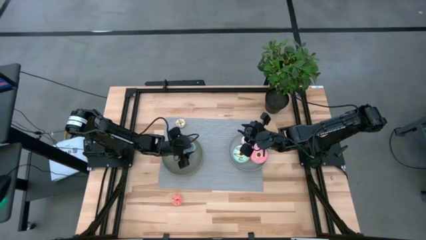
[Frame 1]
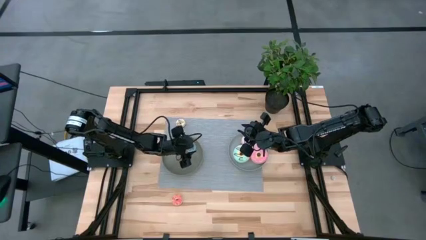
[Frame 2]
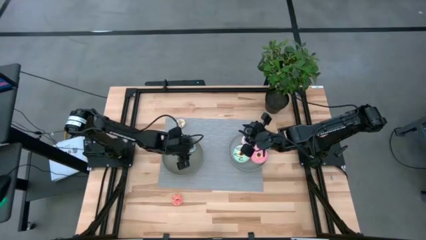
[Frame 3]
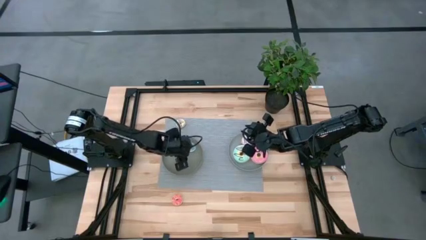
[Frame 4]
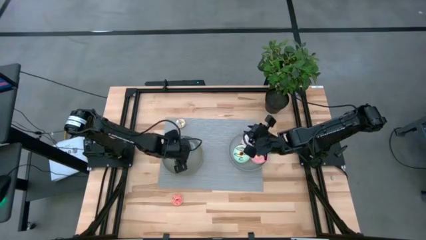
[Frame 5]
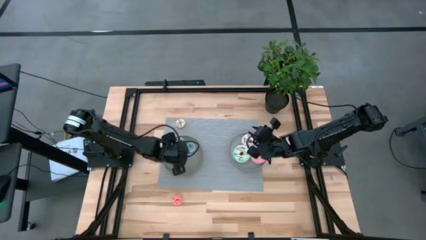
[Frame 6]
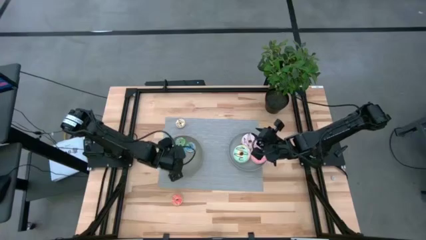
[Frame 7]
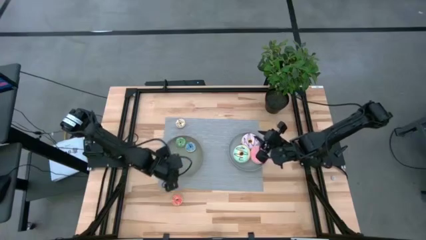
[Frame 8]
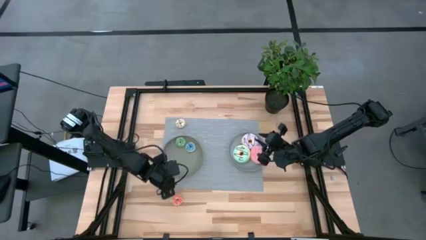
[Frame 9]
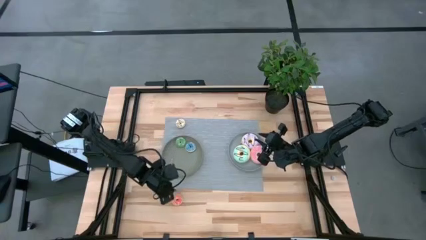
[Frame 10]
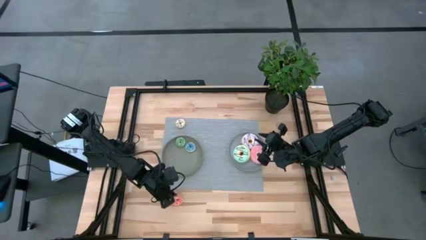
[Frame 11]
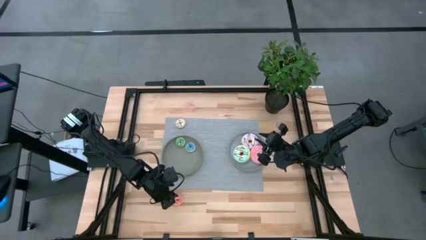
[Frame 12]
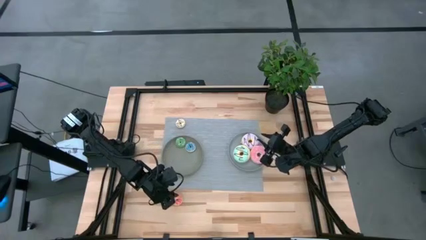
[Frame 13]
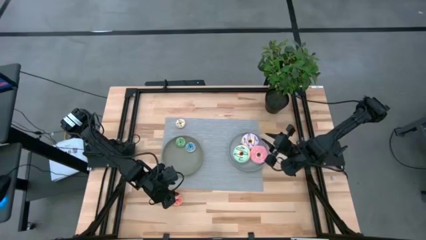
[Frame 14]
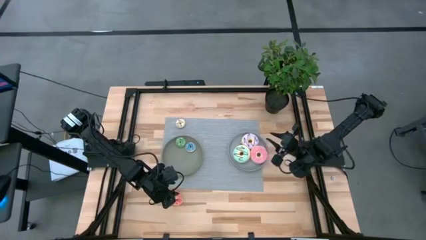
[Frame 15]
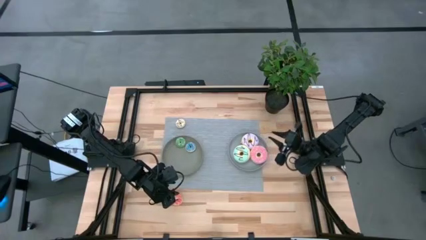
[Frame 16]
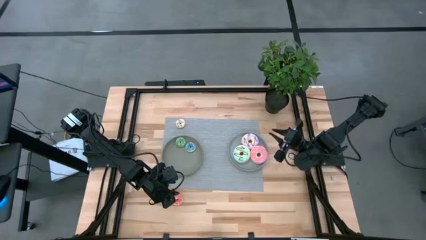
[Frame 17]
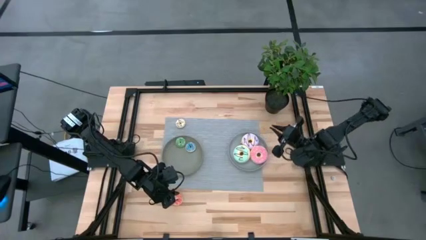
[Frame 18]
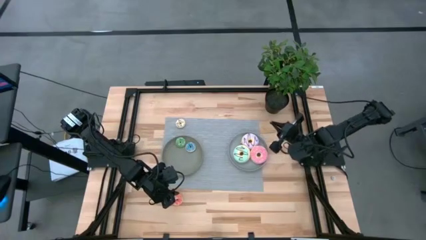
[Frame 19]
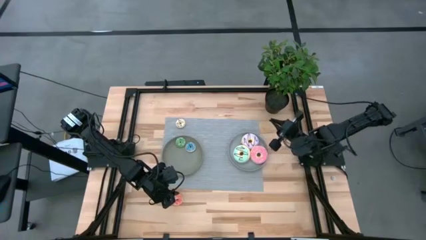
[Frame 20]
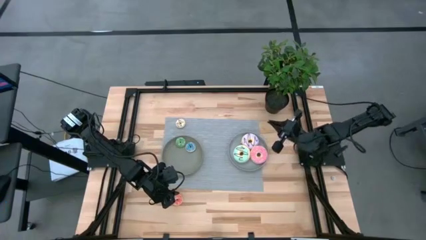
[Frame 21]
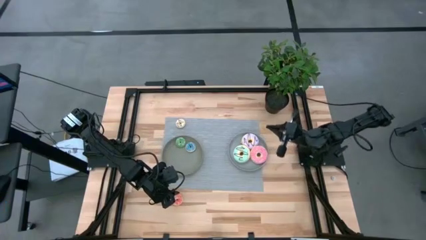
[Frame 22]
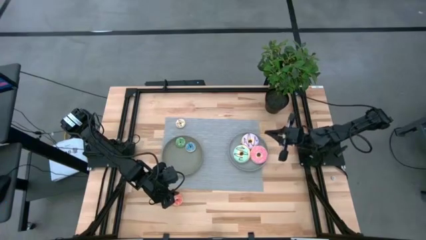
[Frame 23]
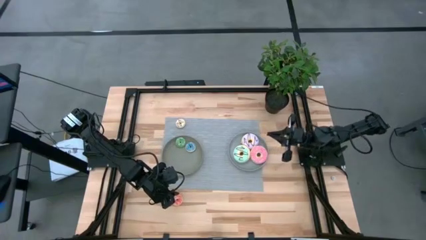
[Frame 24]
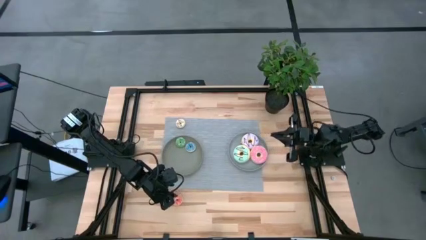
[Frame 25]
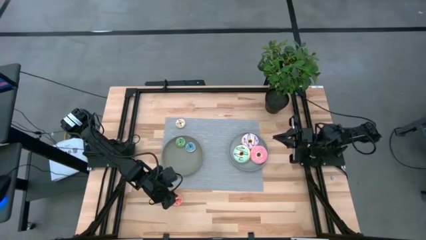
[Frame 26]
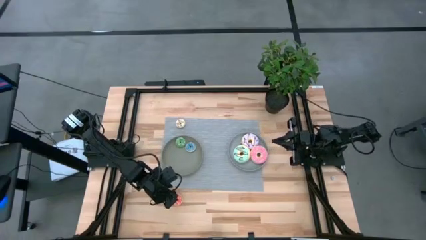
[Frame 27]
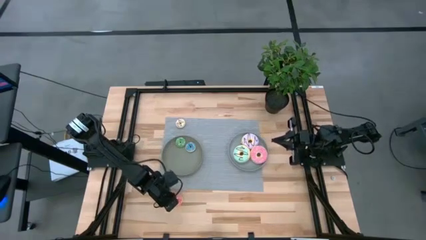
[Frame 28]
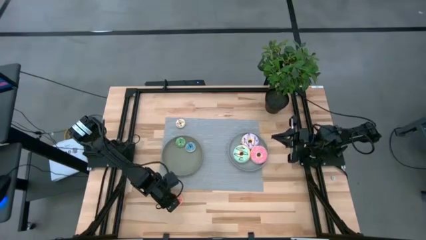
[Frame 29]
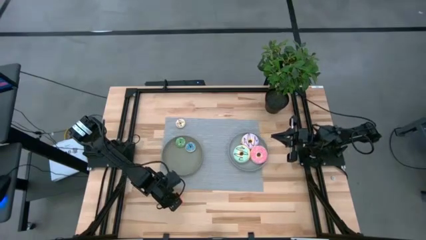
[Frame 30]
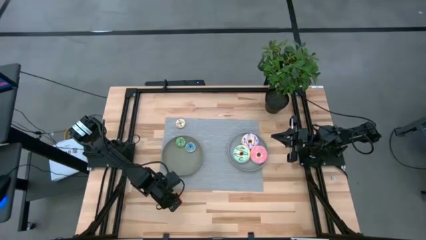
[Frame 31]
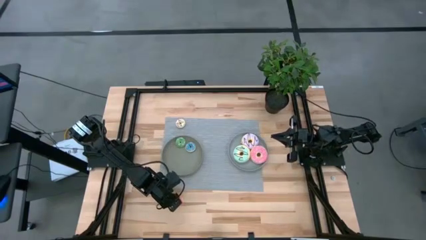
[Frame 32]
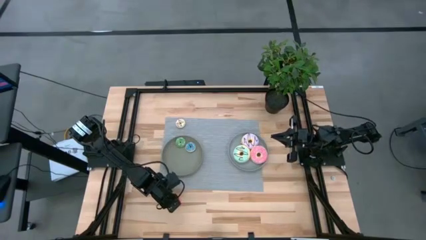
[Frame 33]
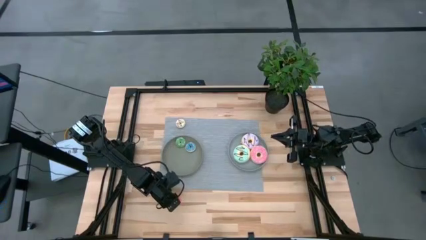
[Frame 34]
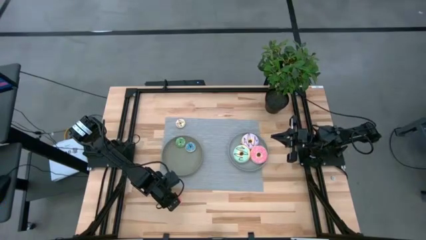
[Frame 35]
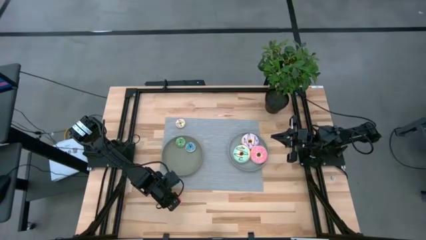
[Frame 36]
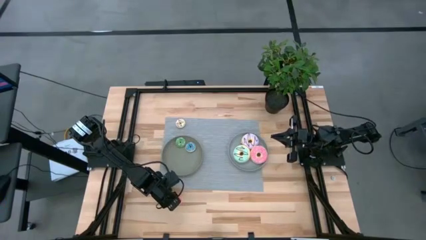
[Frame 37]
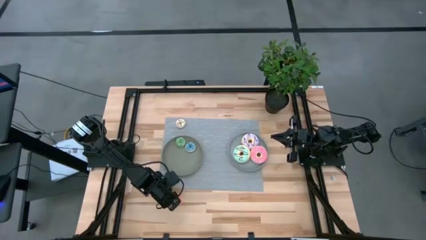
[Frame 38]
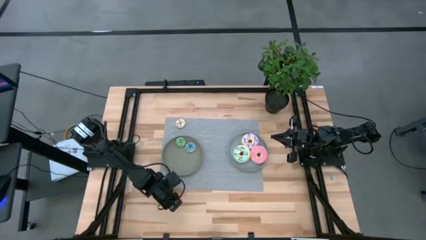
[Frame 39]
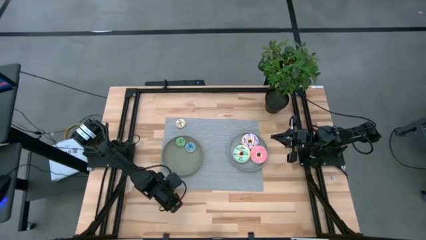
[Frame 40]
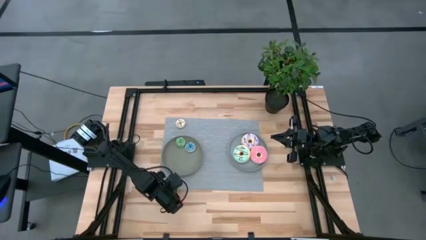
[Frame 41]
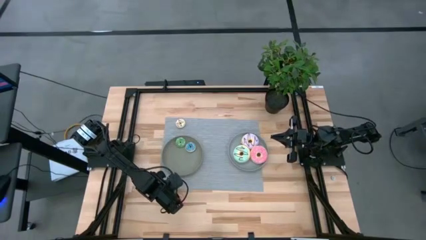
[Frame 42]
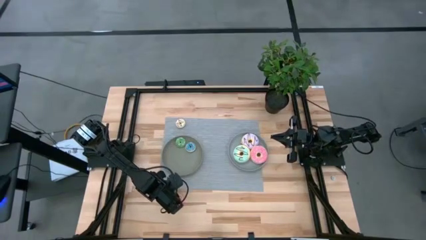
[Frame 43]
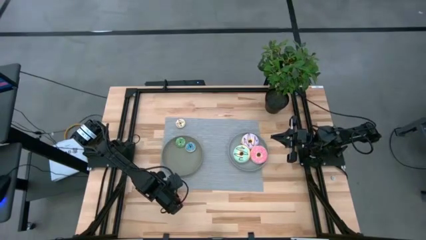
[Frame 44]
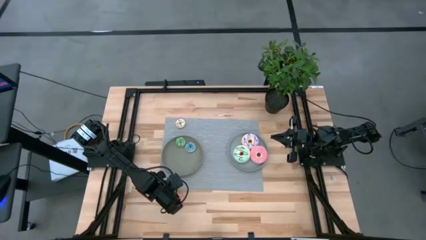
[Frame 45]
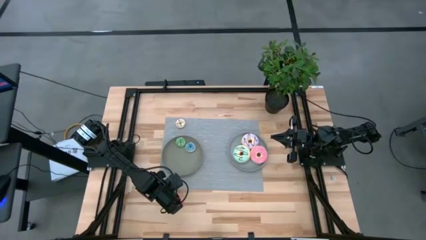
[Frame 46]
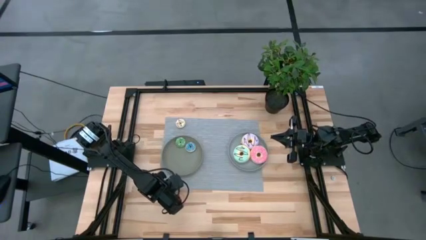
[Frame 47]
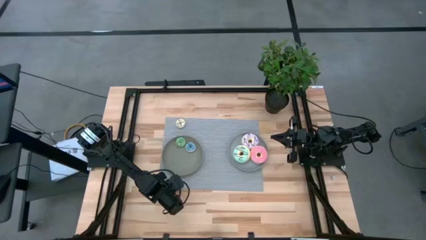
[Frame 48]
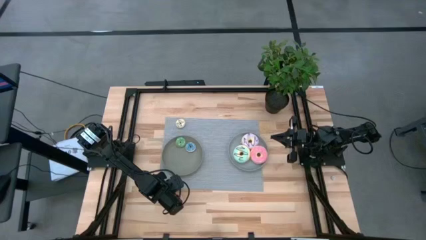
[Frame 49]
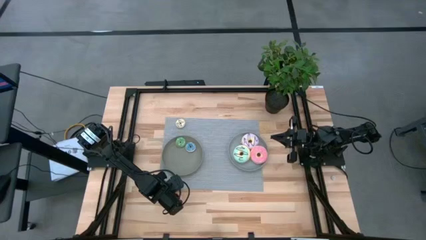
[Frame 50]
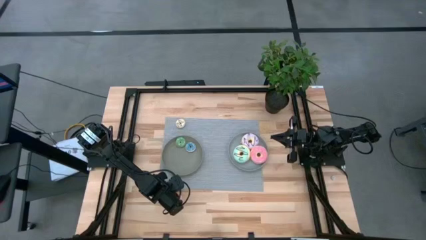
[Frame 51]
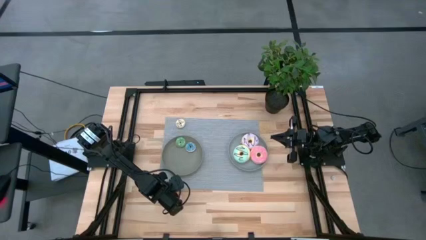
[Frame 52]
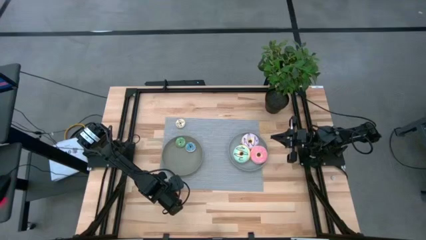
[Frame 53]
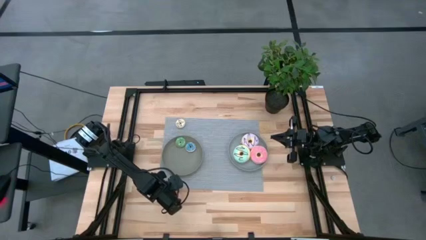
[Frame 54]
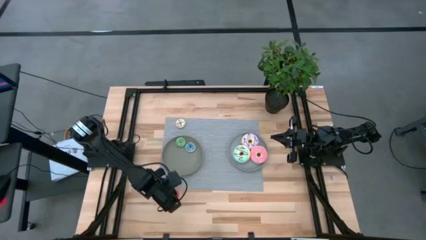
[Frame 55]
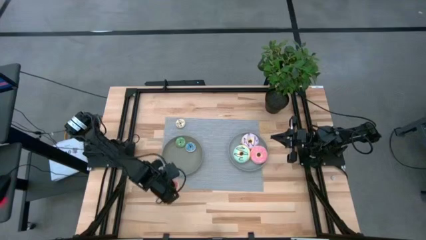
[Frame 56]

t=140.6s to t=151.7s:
Task: Pick & Place donuts
Put the small pink donut into the green plate

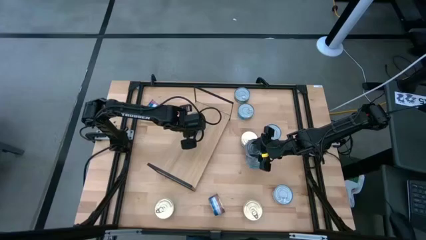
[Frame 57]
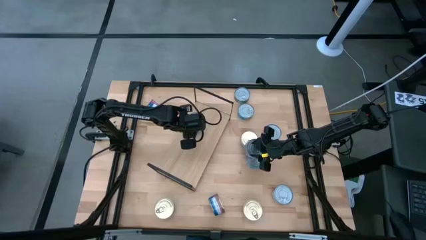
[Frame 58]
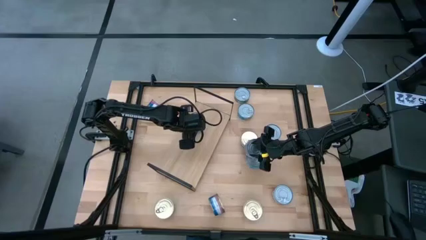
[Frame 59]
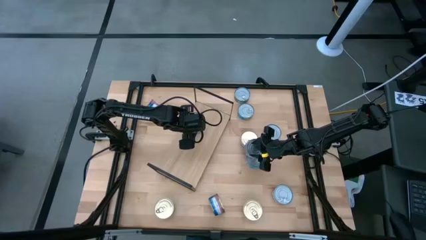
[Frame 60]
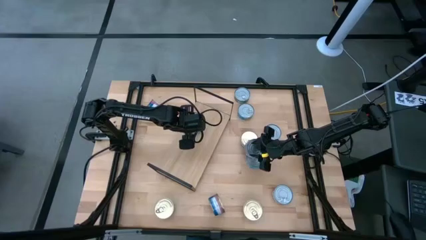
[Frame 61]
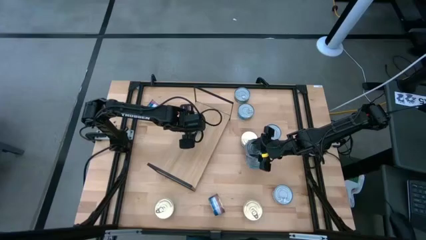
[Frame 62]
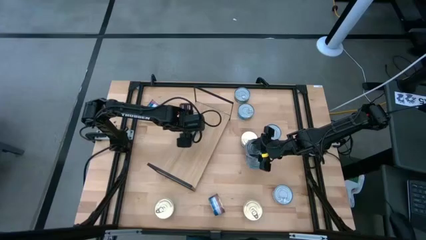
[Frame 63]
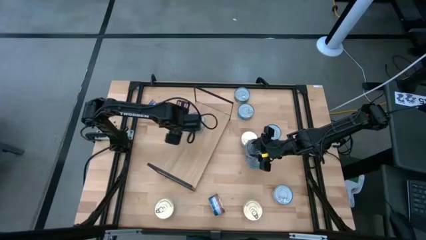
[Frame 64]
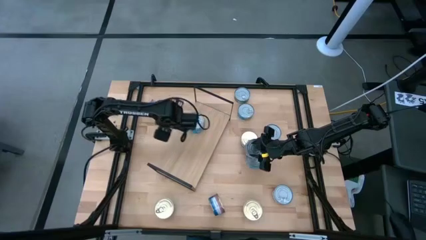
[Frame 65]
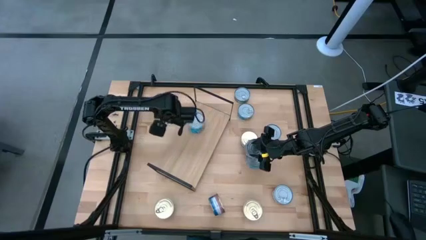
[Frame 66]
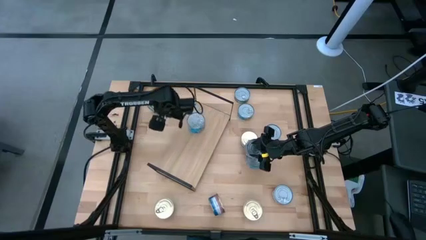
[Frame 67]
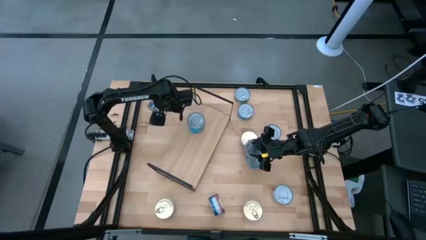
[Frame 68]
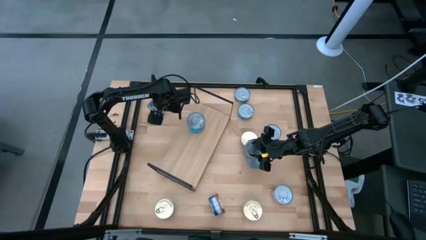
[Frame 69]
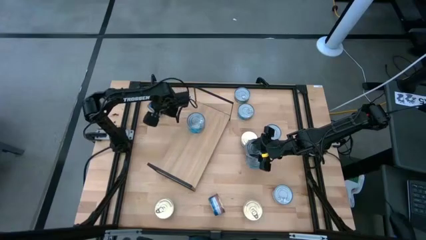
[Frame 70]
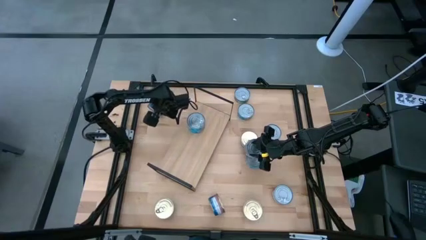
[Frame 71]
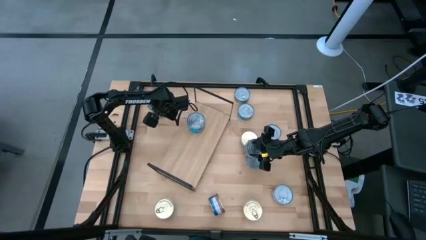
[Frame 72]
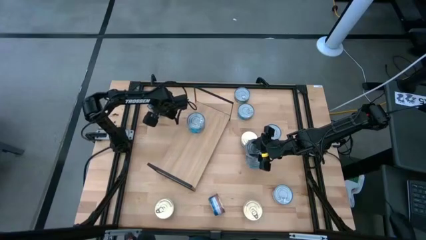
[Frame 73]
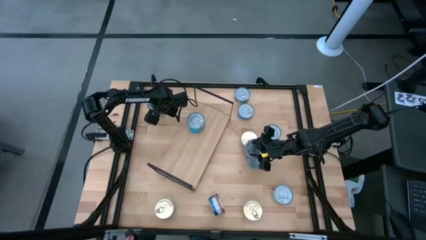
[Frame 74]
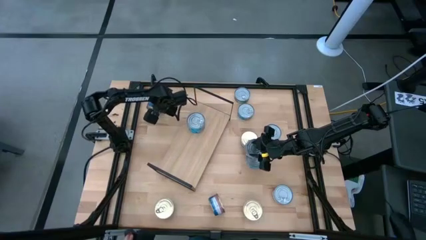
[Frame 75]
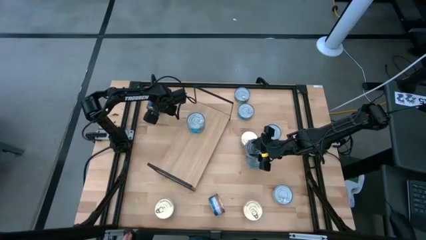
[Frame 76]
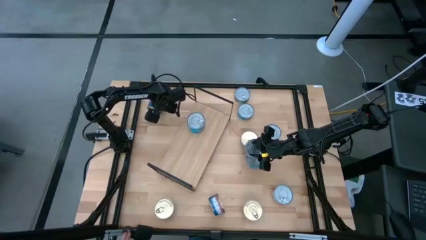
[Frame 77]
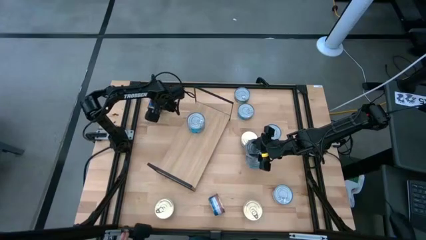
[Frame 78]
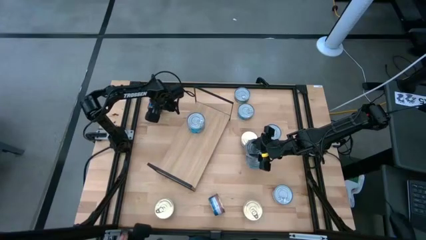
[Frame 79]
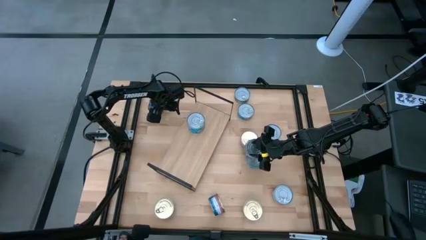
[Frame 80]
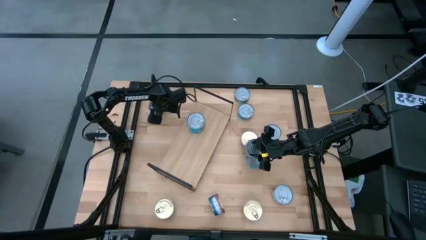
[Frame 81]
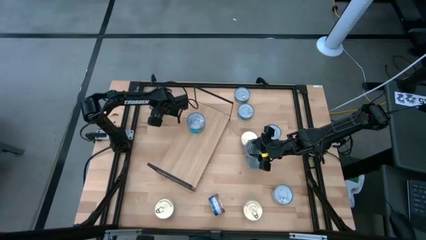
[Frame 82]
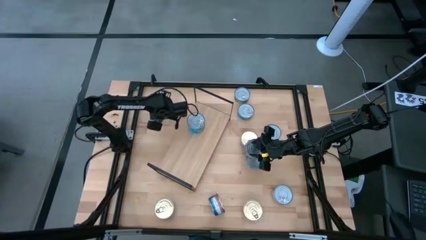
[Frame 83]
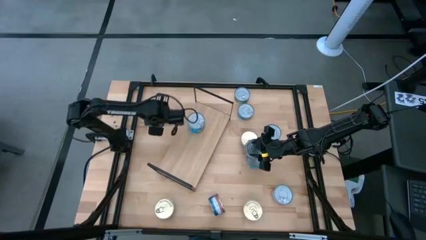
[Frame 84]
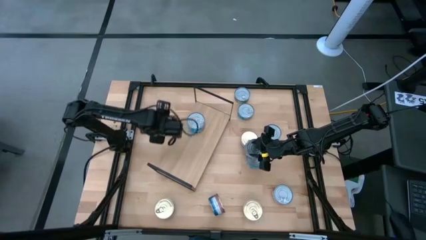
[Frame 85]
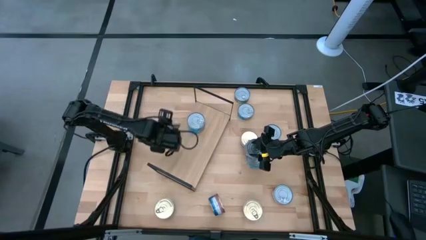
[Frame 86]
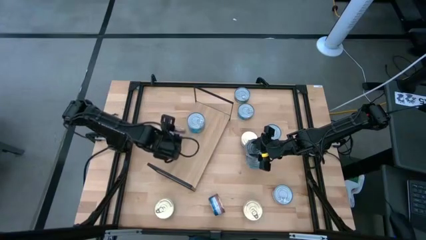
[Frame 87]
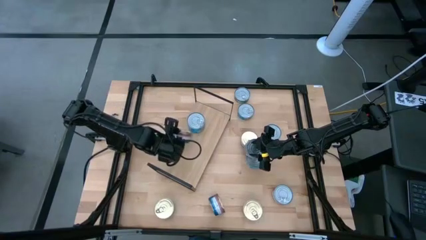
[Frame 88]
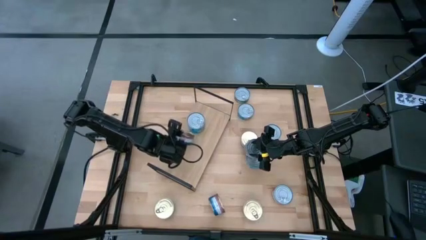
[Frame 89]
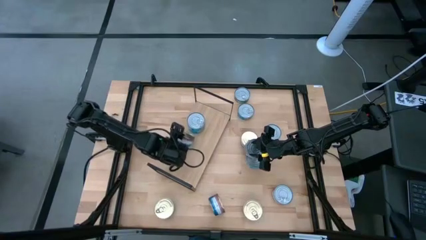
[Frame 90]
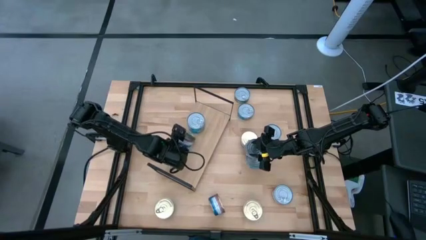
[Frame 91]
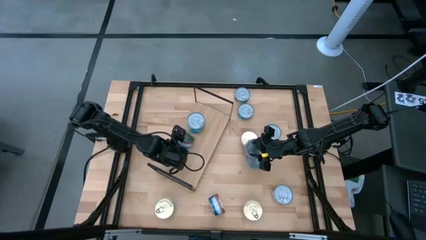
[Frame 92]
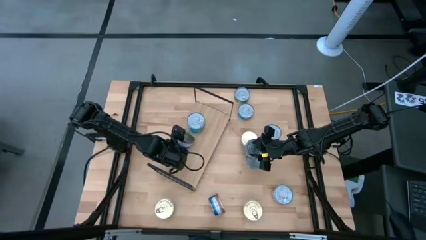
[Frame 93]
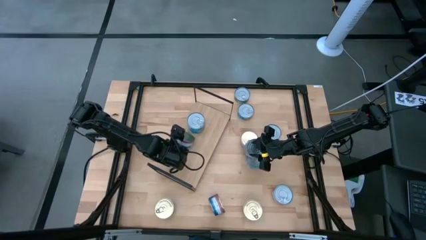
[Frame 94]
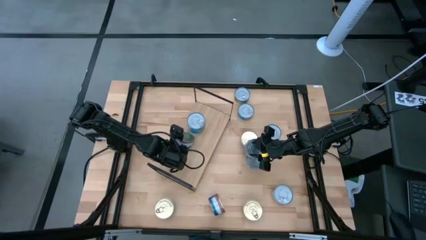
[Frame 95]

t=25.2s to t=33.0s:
Task: Stack canned seafood by type on shelf
Put the blue tuna can on the shelf
